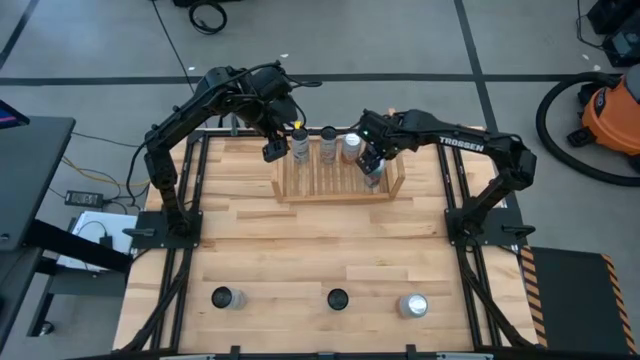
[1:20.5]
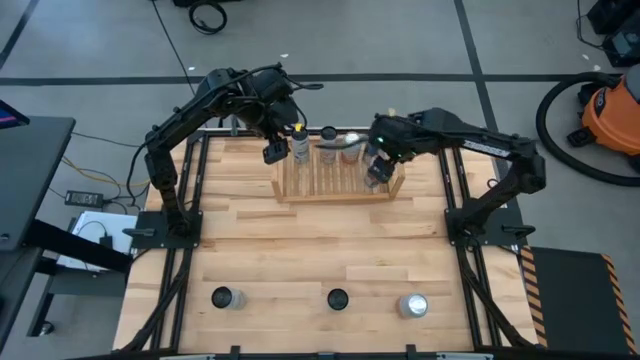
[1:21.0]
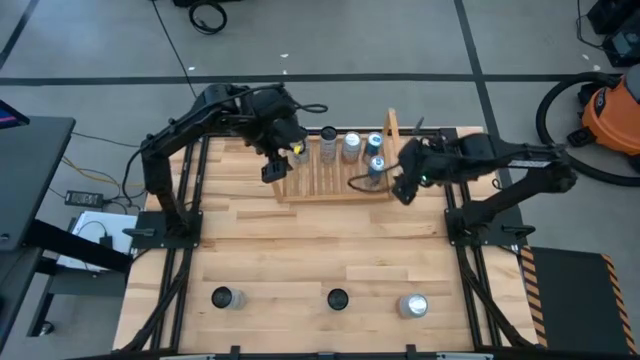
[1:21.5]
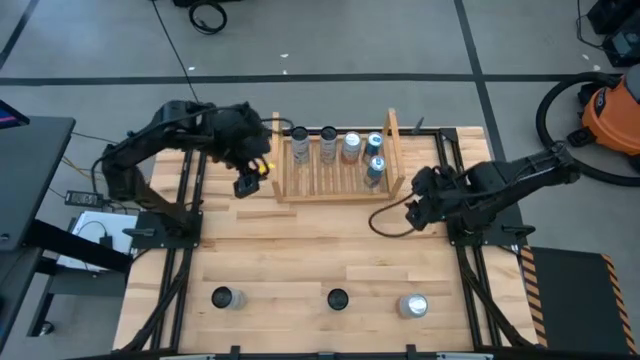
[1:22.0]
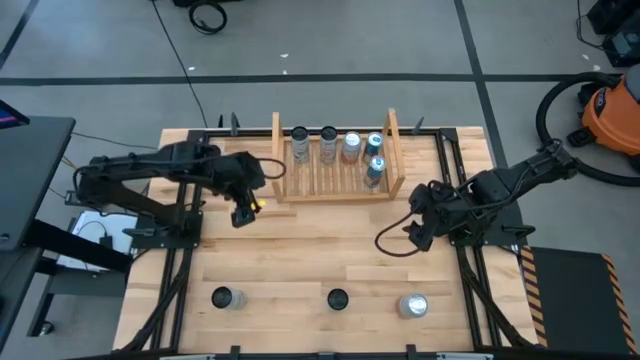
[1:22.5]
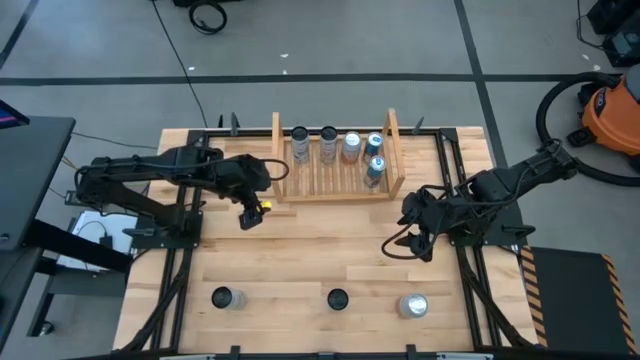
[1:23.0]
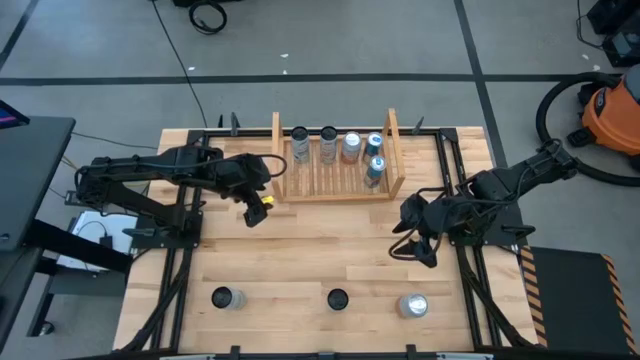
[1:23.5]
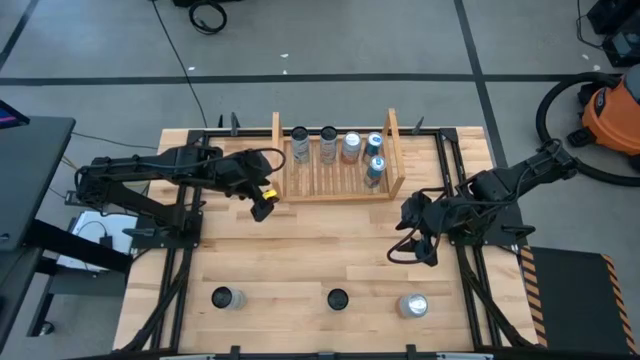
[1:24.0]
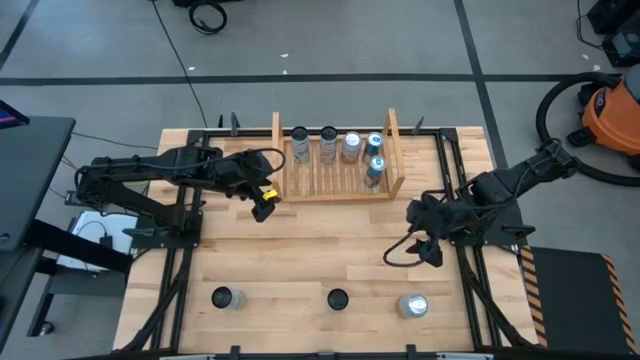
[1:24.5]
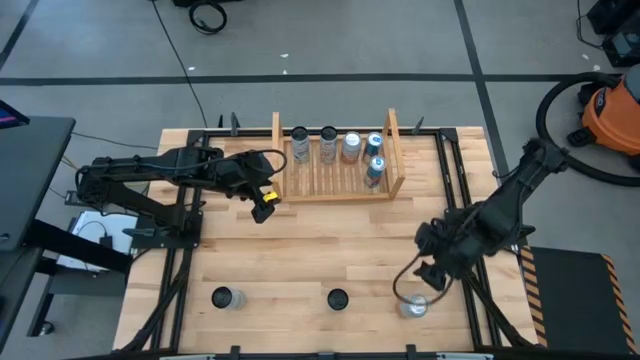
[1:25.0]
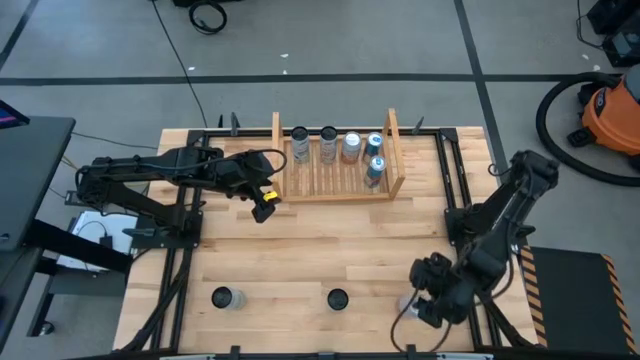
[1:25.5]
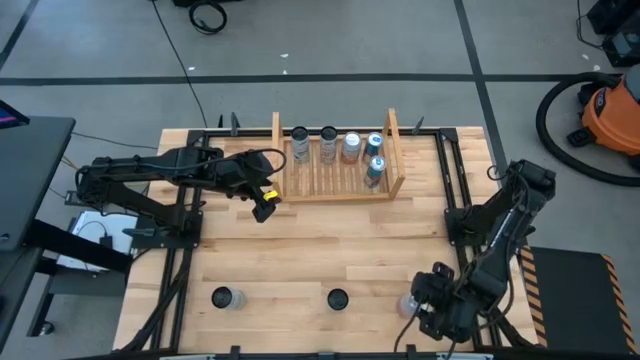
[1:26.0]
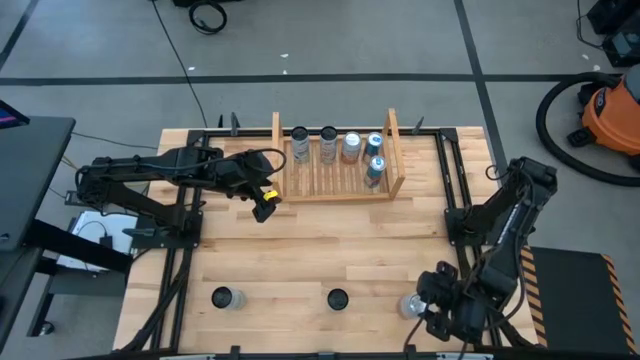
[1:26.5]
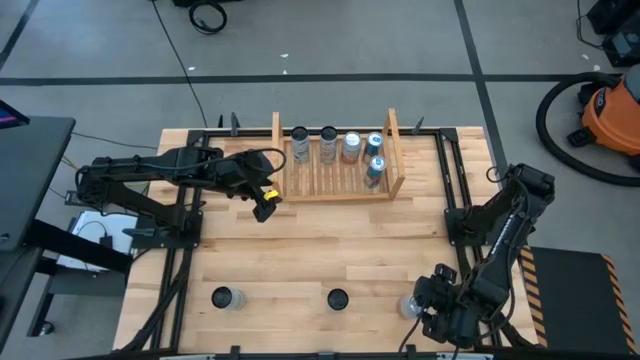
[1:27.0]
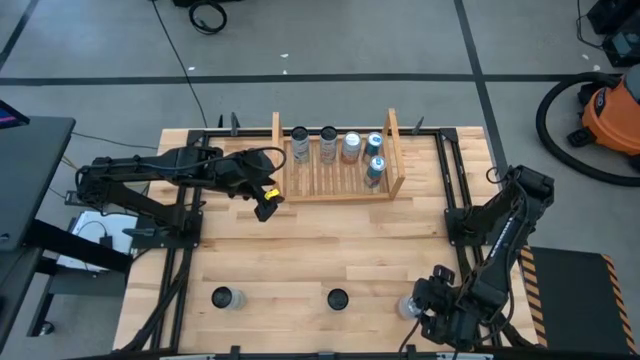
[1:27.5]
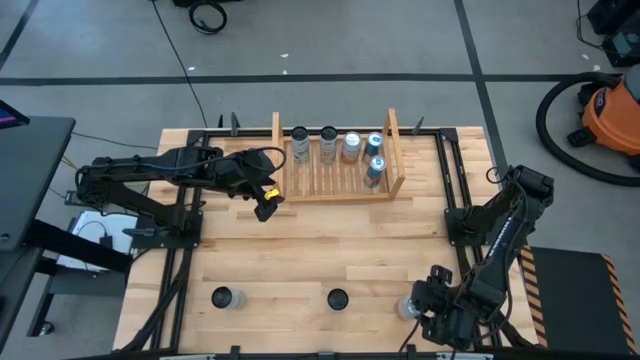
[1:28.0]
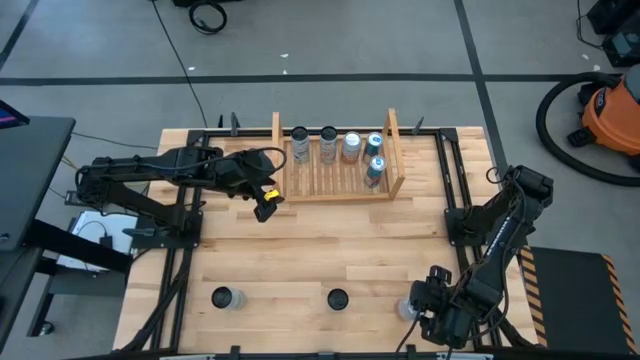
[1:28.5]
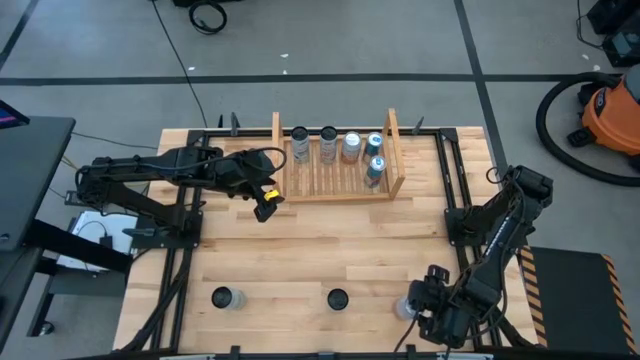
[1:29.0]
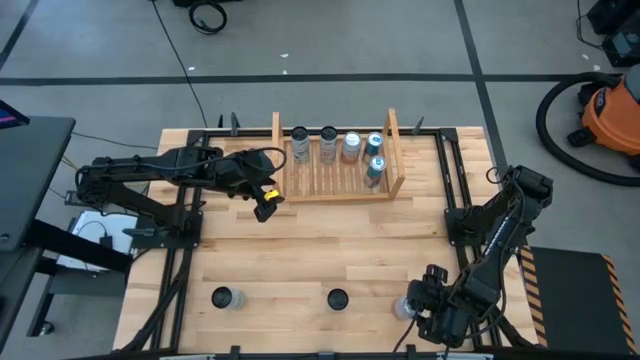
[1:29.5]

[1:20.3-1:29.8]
Task: Place canned beverage on shelf
Put the pink and white soda can into the shelf

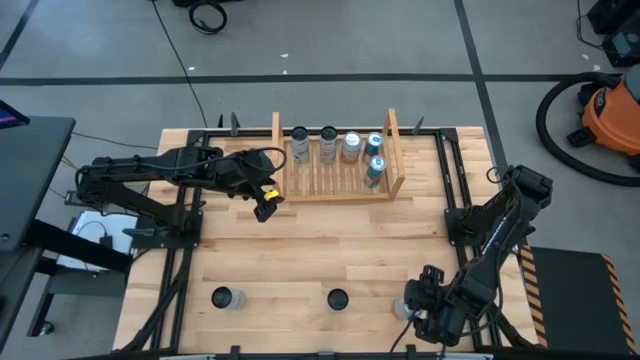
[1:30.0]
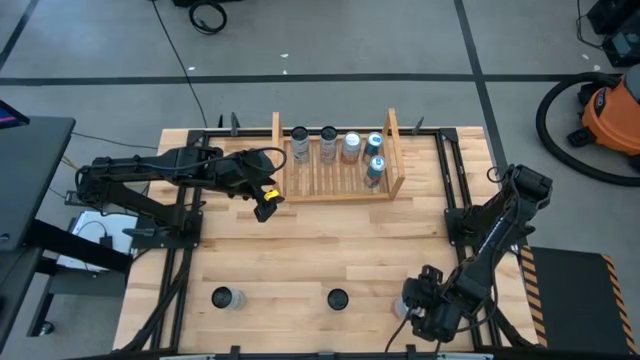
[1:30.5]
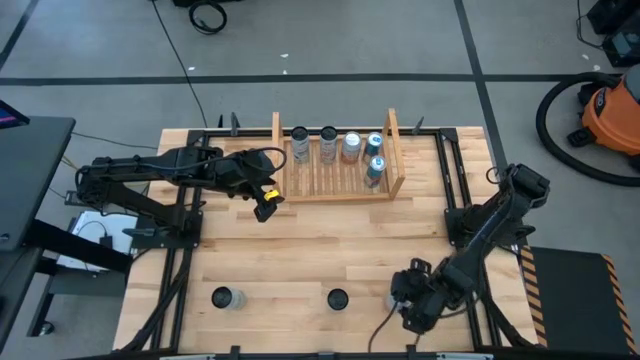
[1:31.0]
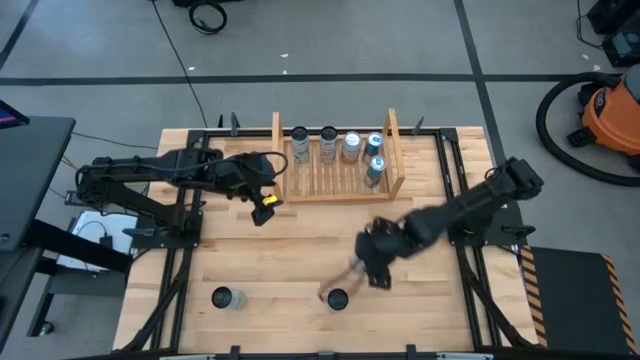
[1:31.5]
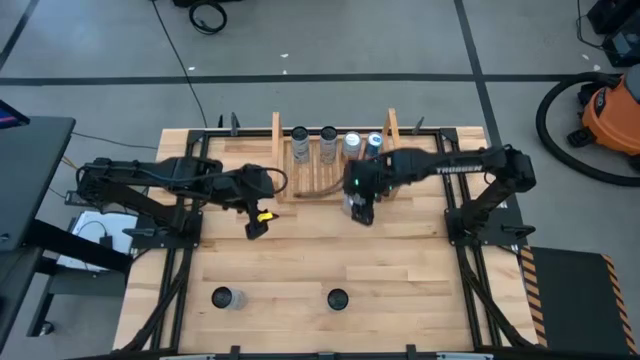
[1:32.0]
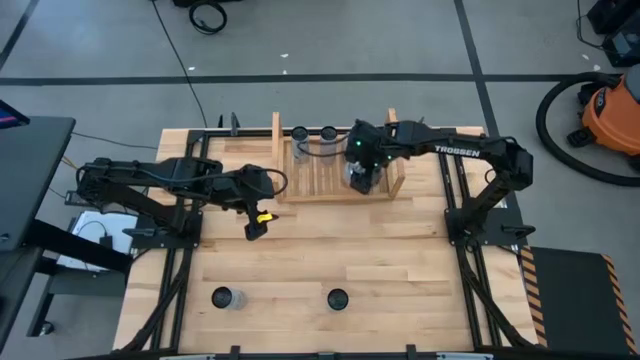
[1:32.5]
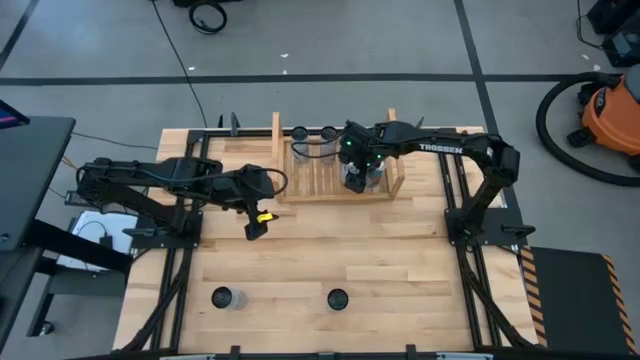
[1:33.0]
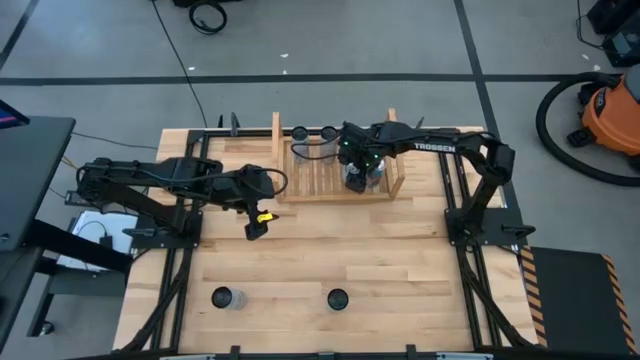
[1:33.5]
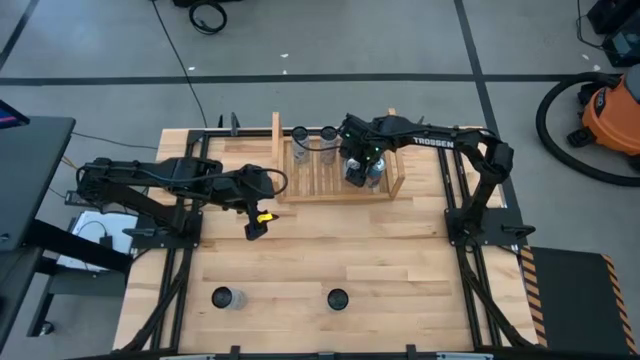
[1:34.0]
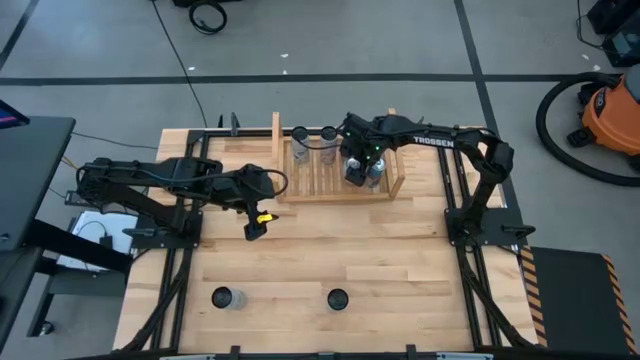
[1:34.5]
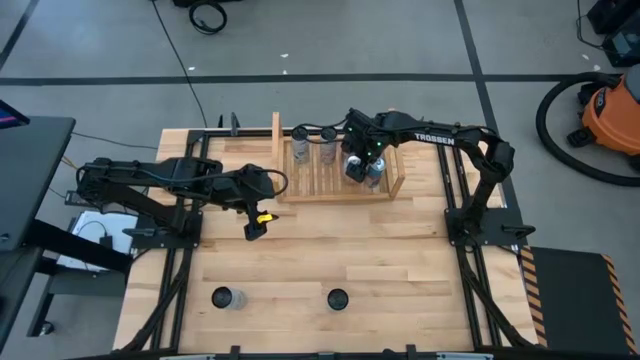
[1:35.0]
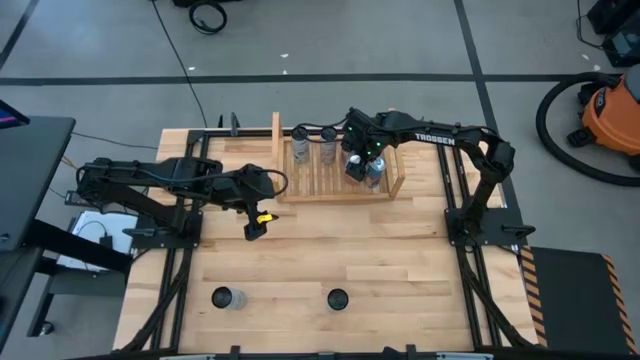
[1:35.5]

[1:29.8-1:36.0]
Put the pink and white soda can into the shelf

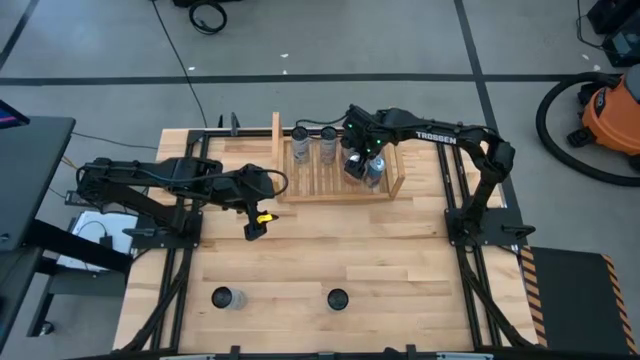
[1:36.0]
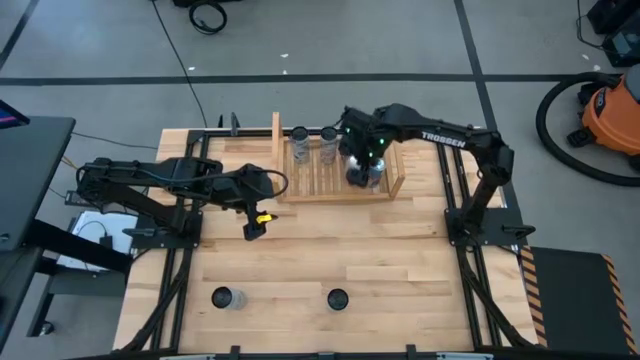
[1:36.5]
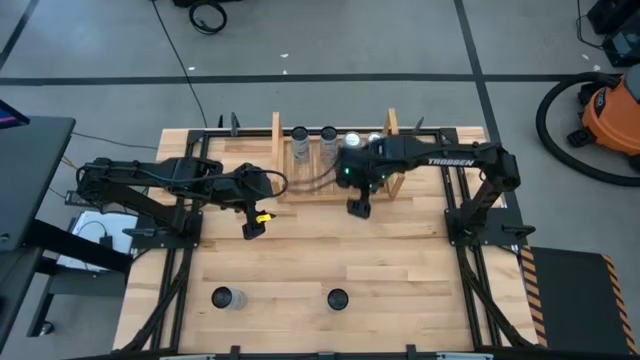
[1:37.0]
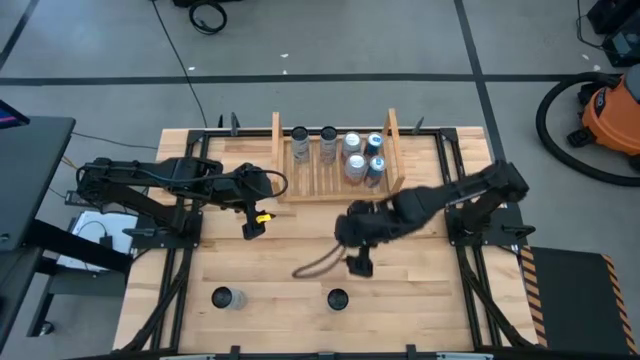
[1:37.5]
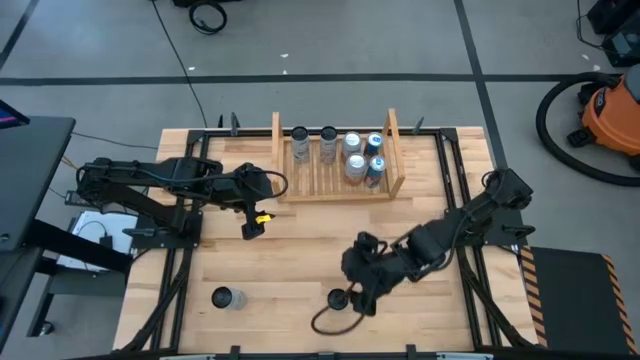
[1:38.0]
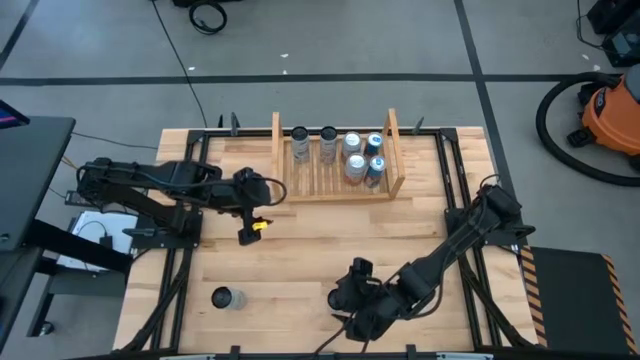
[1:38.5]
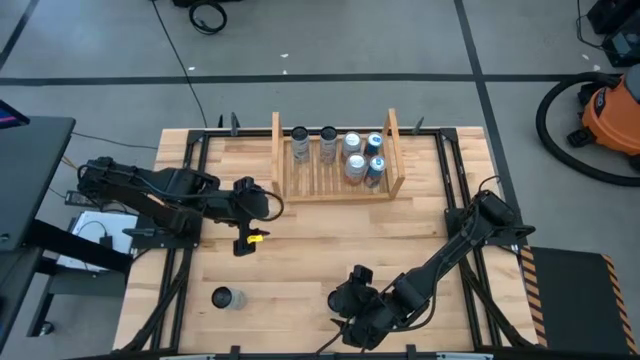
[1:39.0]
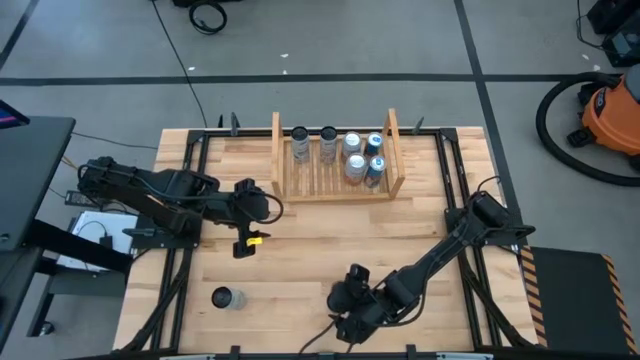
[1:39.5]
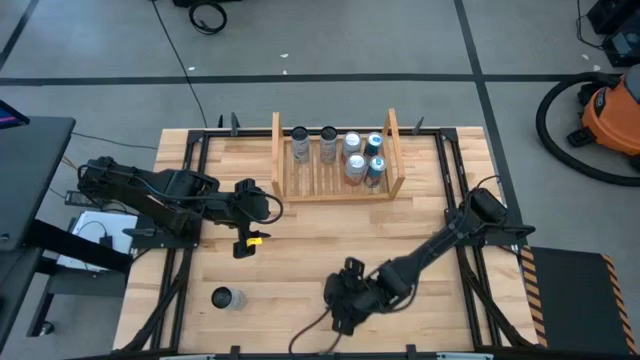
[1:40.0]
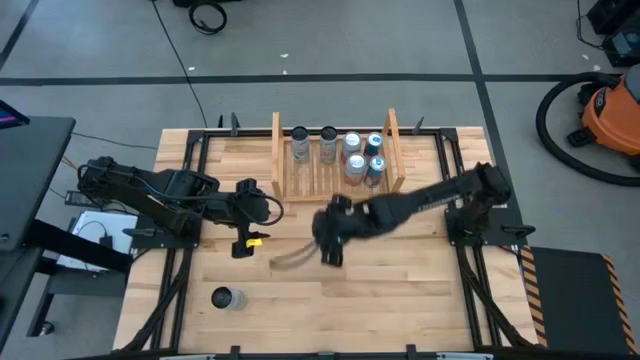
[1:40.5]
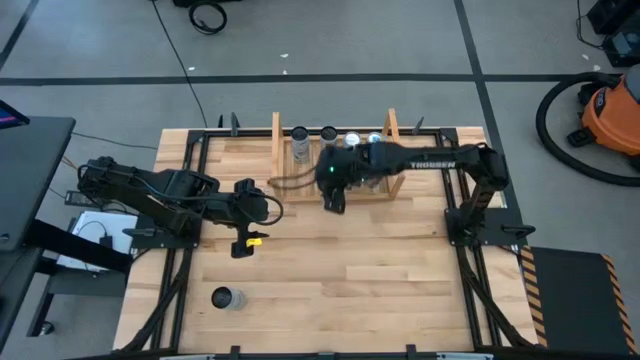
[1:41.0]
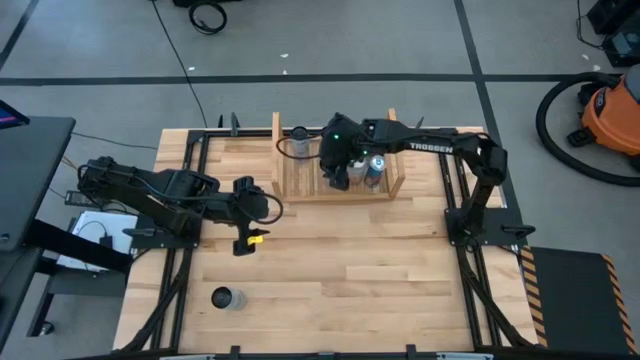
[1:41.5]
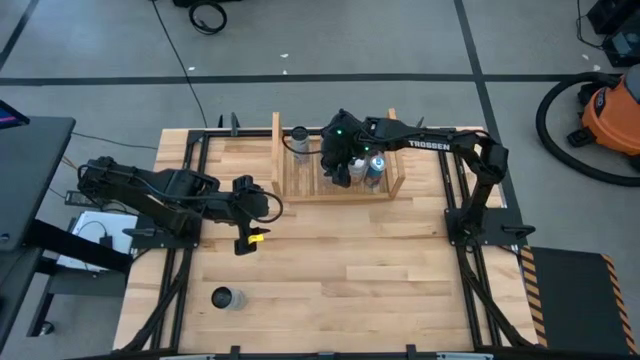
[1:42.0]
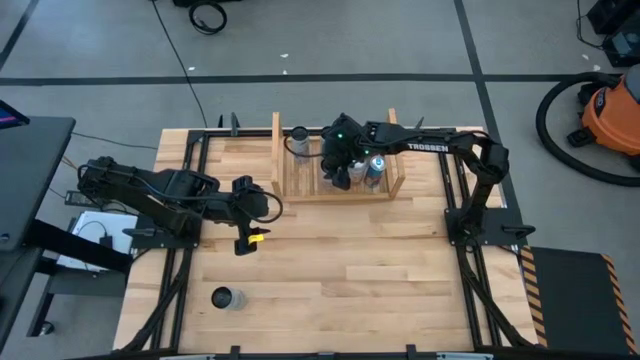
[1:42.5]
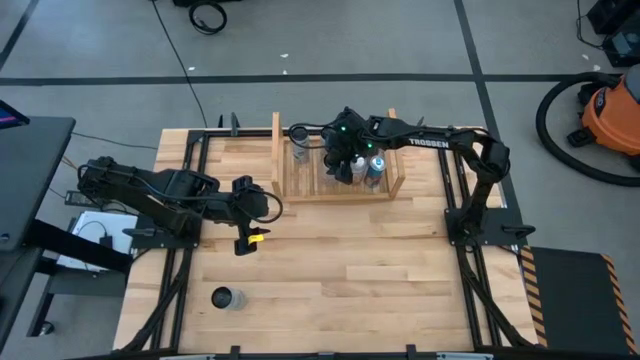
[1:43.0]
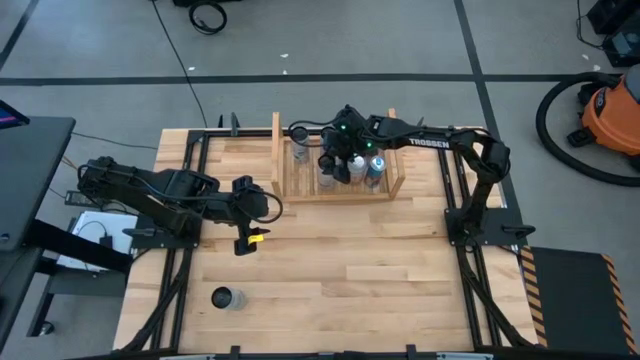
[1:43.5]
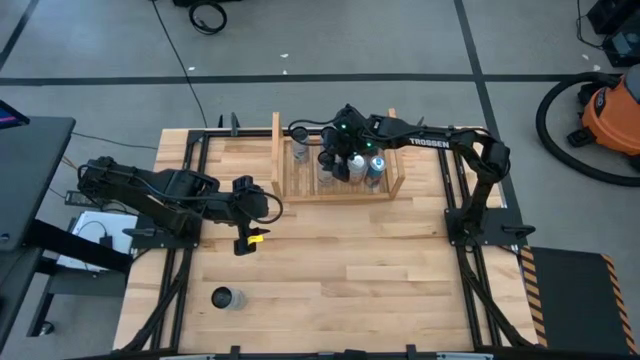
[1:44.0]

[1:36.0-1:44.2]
Put the right white soda can into the shelf
